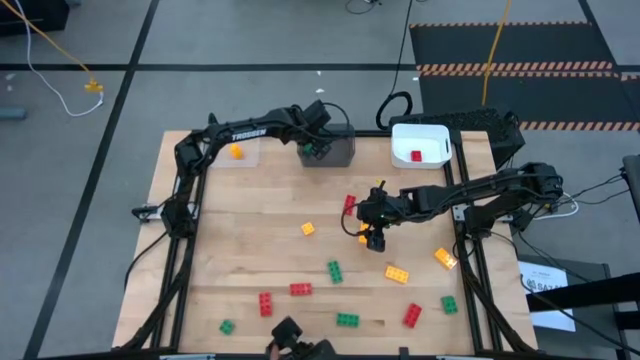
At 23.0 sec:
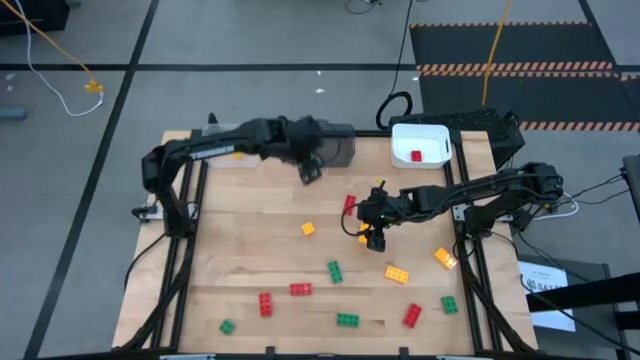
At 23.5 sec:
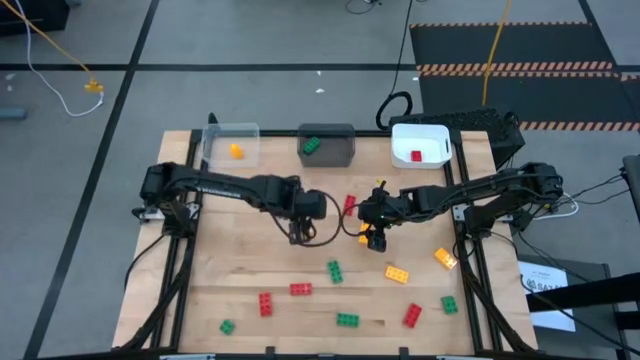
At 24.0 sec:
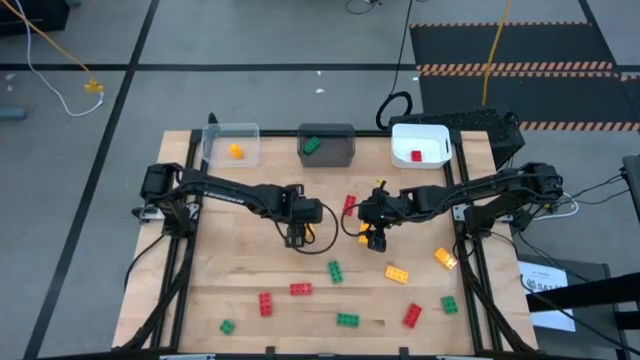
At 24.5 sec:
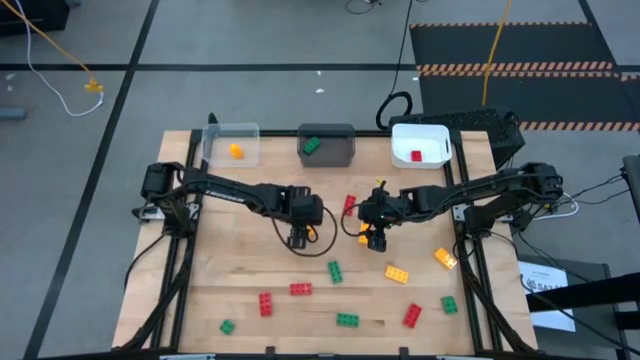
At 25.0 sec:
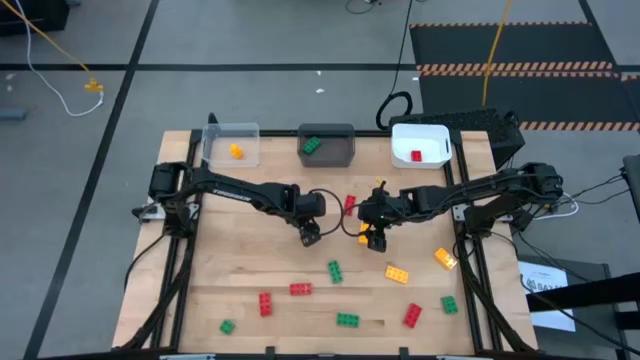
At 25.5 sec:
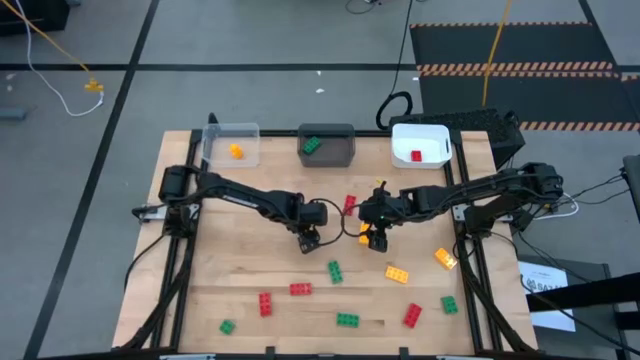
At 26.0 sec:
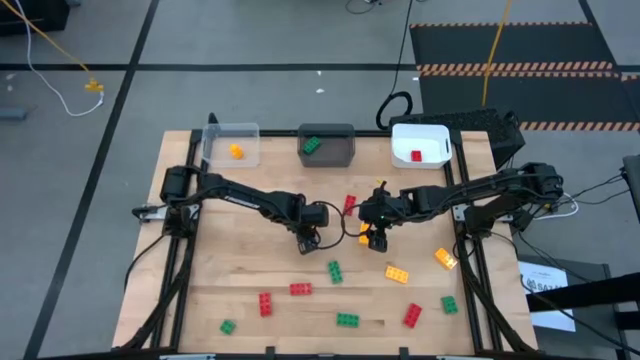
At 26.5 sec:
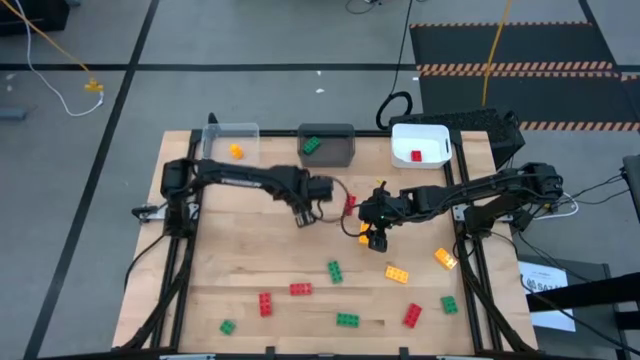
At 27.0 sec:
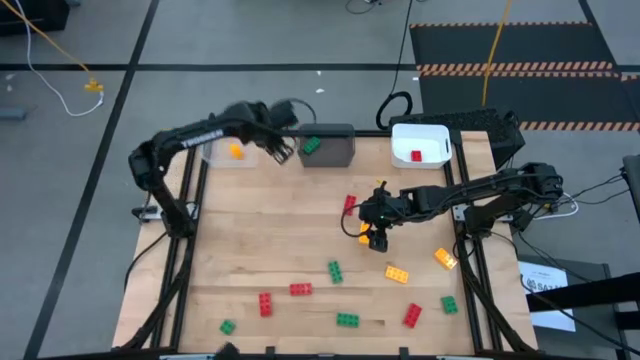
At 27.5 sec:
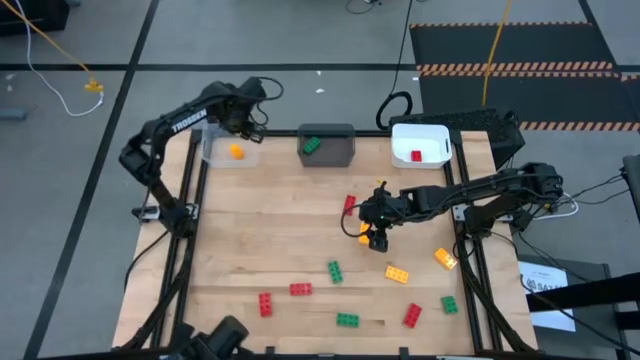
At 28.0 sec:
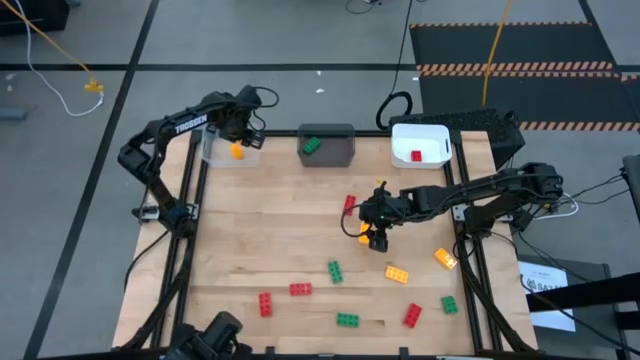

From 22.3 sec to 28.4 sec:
Task: Sort & place blocks by color
Put the 4 stud yellow game piece into the transparent bin

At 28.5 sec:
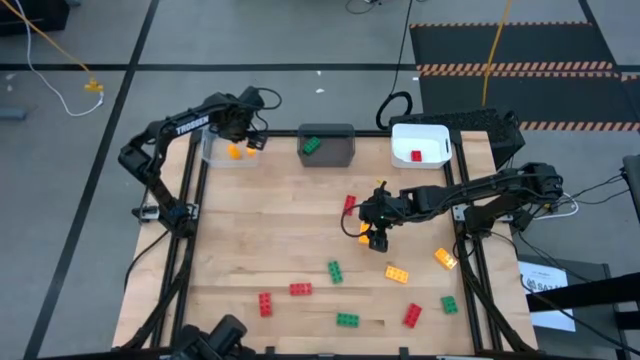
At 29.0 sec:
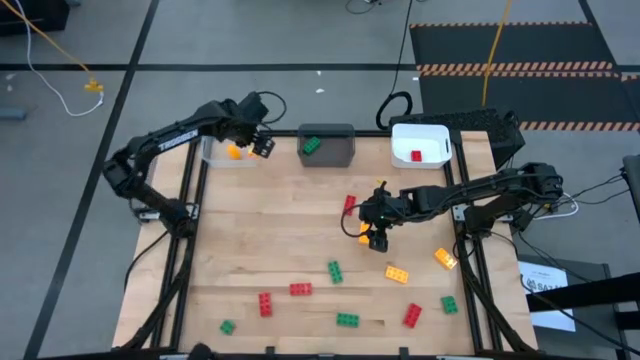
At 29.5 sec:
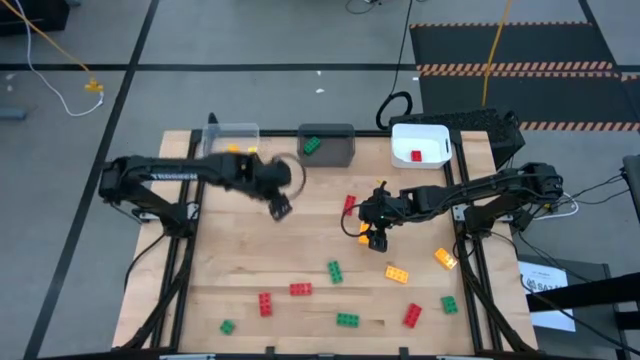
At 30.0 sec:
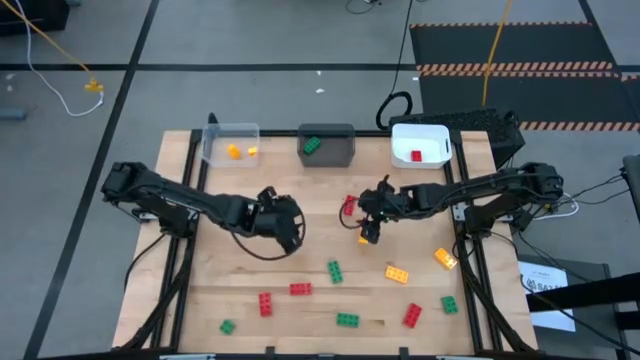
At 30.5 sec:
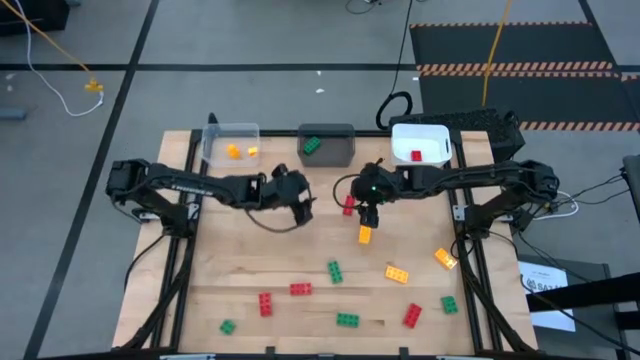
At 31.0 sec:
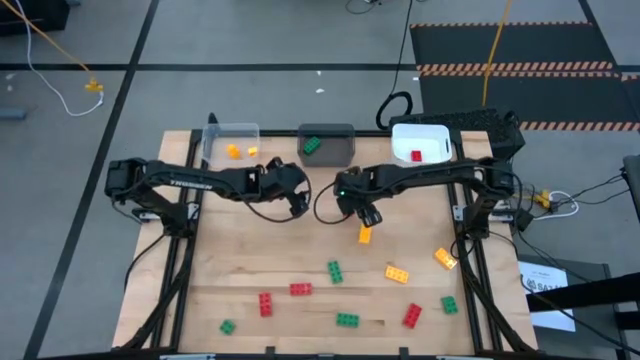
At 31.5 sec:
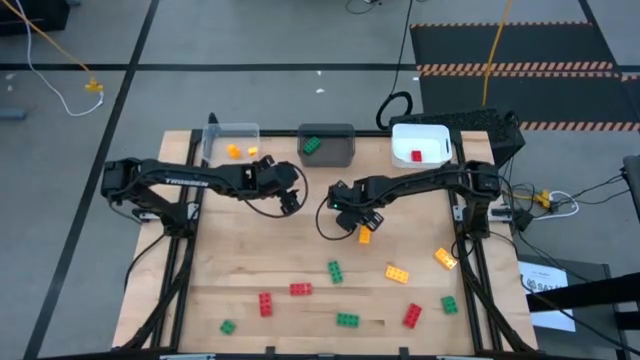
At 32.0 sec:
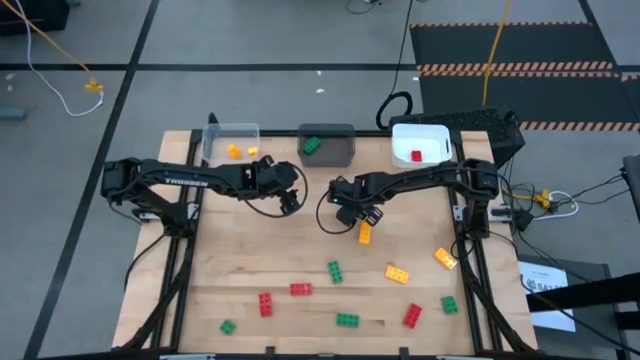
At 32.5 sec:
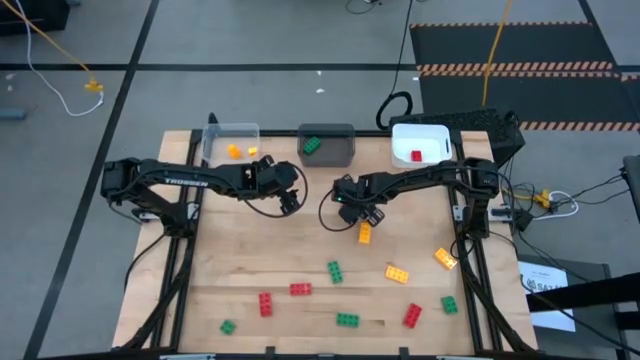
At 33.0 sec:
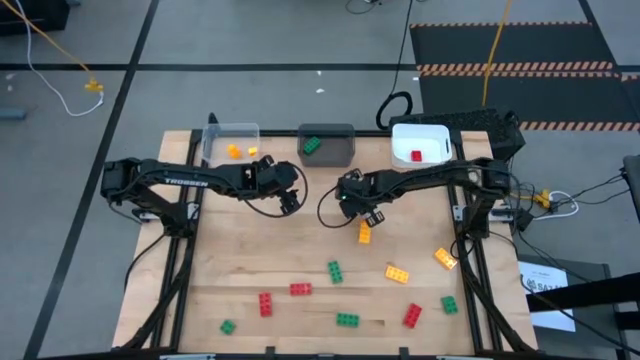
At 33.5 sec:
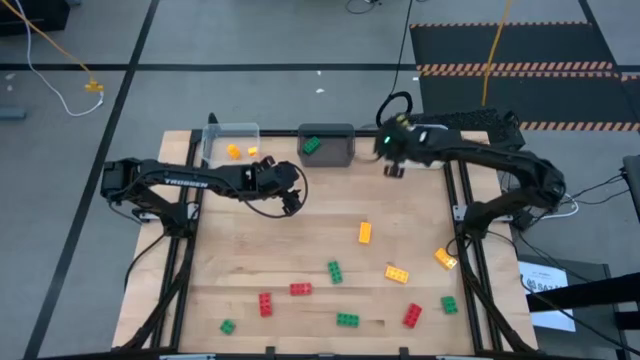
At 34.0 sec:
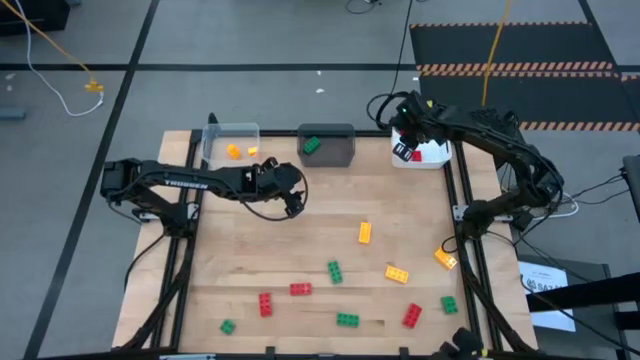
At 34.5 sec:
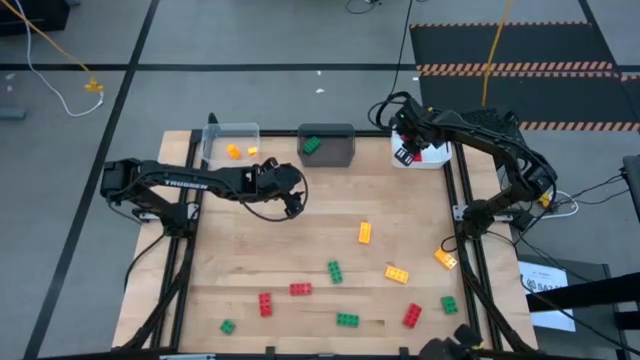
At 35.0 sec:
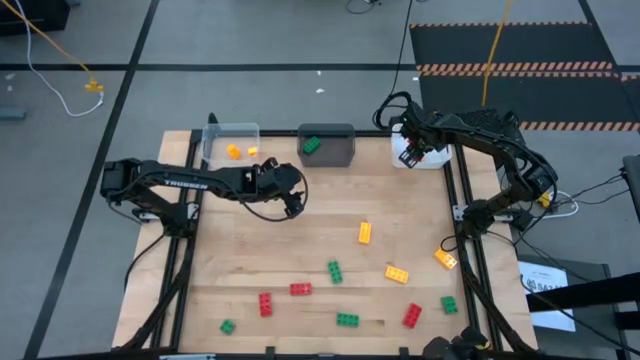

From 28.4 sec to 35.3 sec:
Put the upper 8 stud red game piece into the white bin

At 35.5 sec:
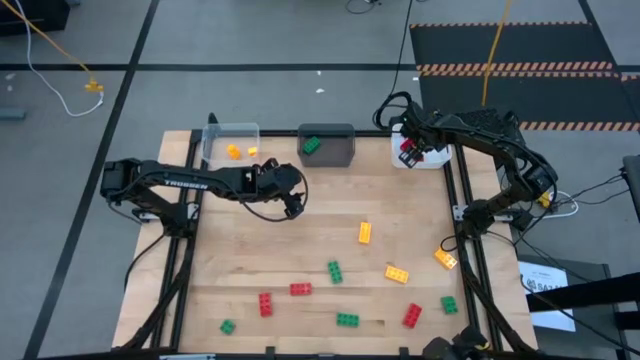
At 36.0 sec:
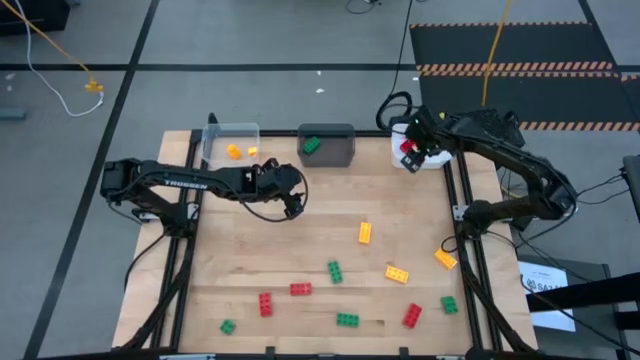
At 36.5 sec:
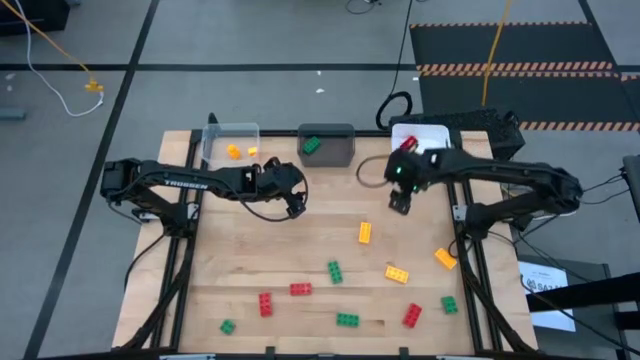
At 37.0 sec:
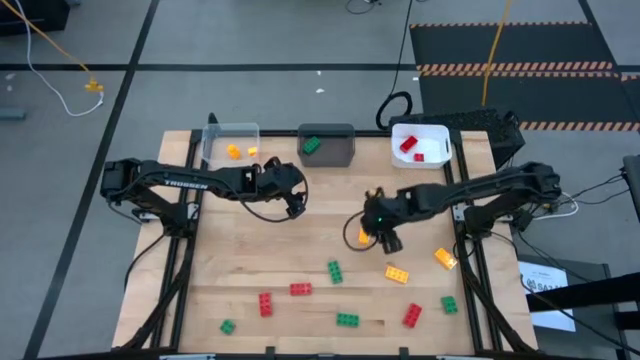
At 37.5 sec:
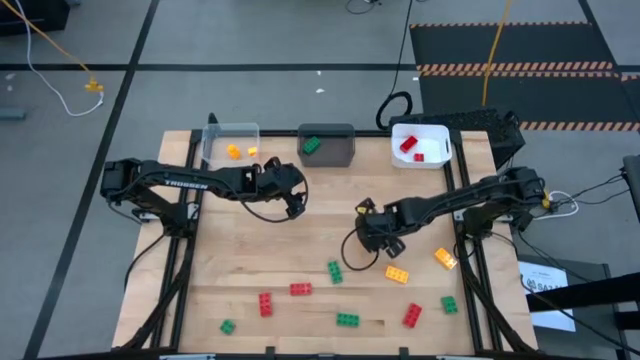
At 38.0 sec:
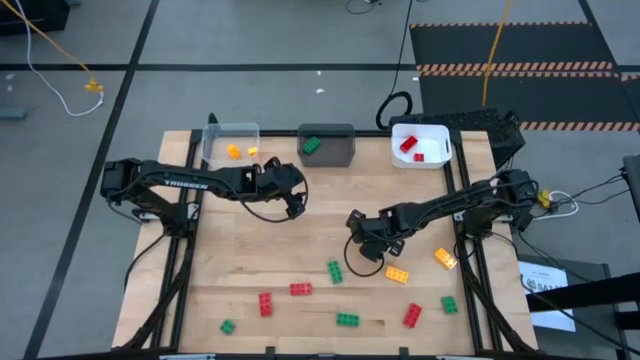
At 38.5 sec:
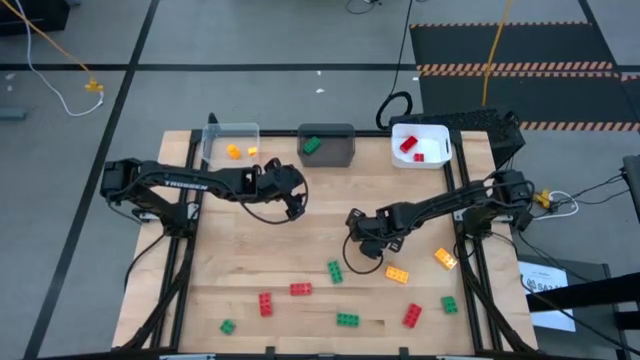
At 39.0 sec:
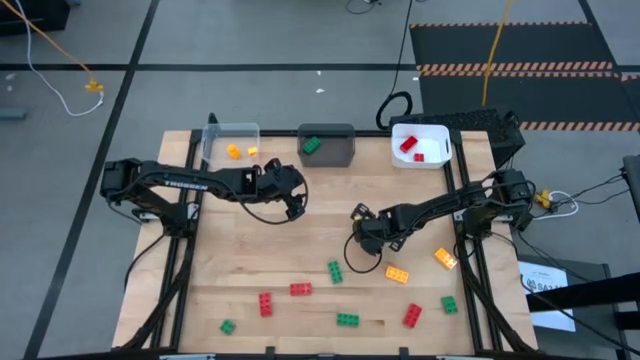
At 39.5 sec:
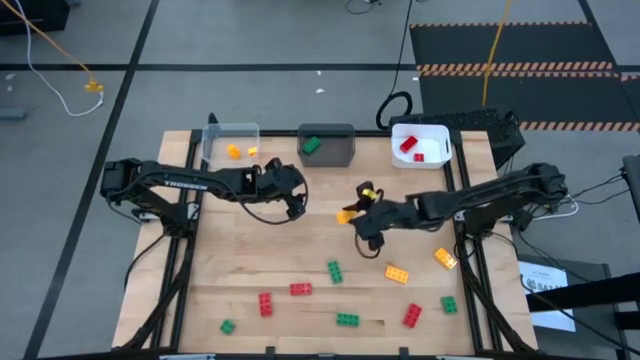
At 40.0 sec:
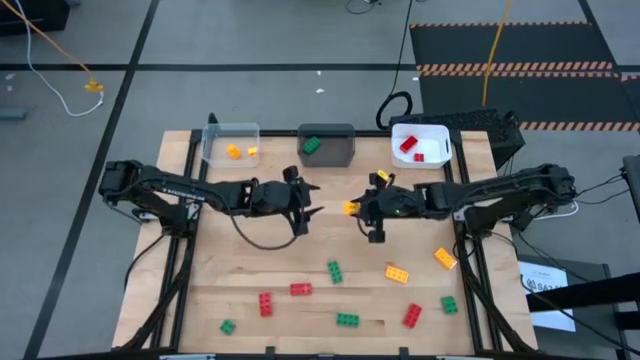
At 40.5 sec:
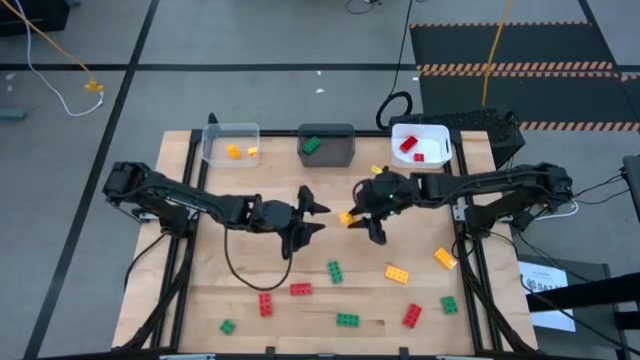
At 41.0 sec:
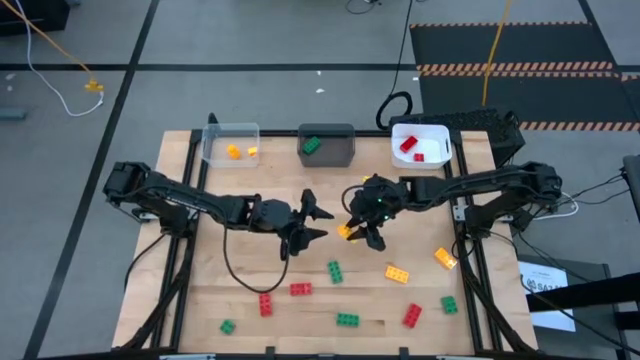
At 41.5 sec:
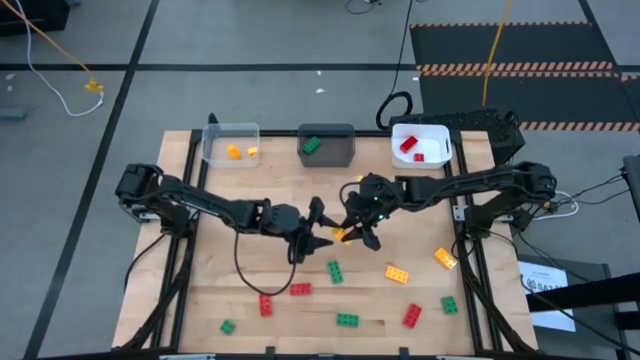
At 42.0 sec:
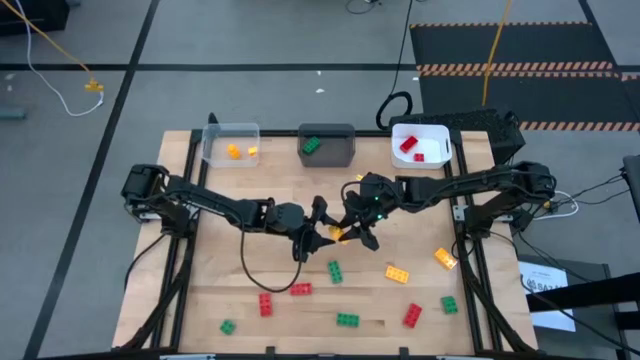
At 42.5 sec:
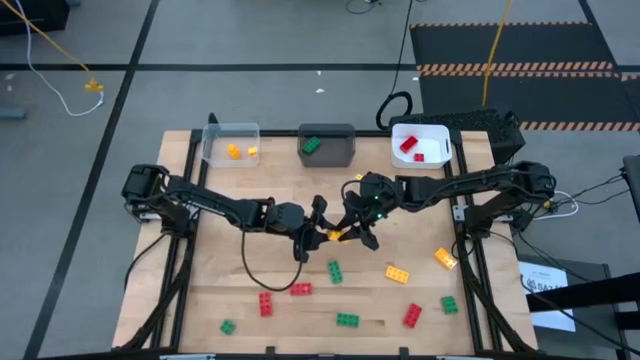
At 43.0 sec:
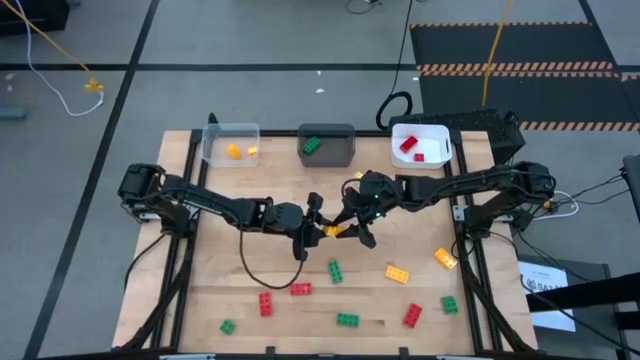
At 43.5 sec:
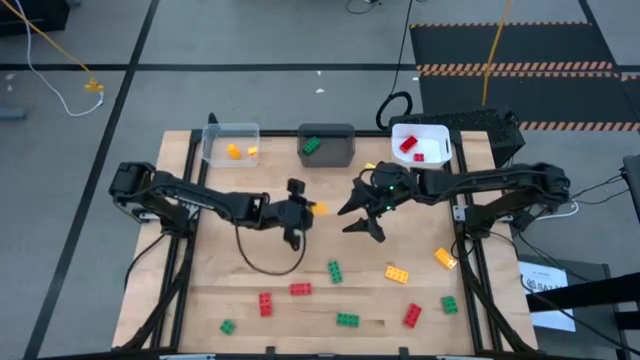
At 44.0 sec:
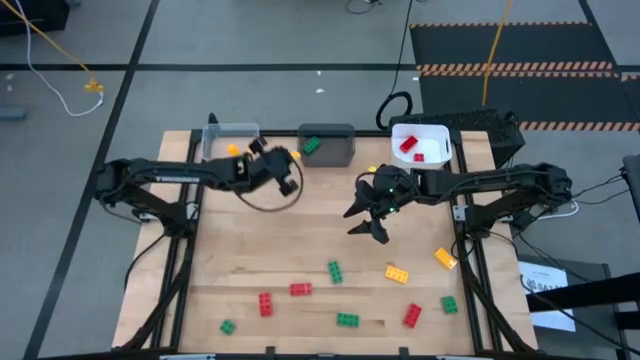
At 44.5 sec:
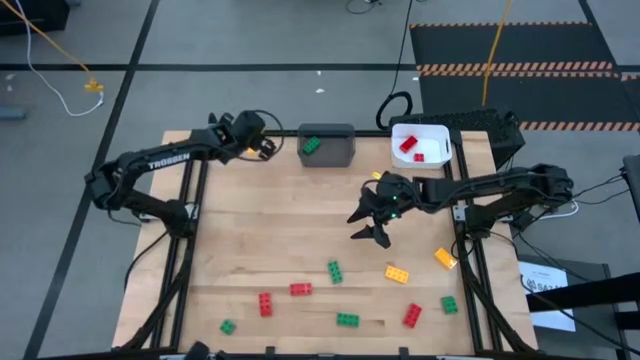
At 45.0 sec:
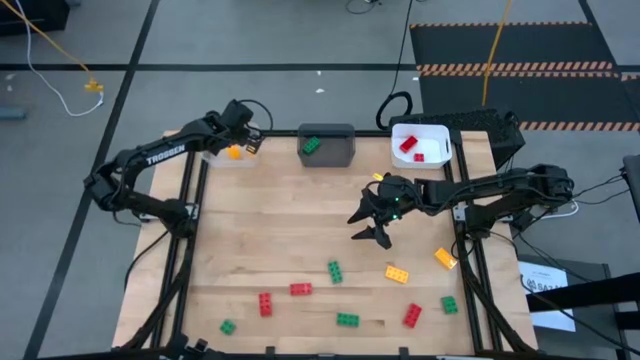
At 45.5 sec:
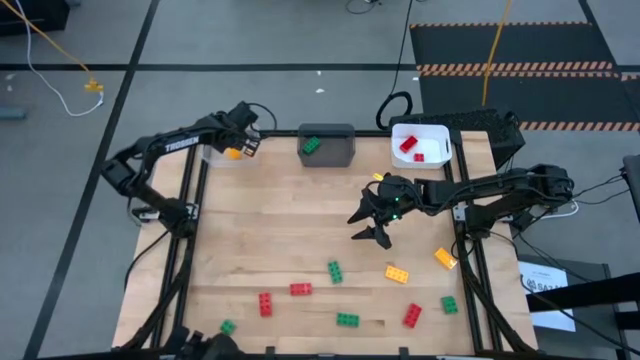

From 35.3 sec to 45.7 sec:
Put the left 8 stud yellow game piece into the transparent bin
